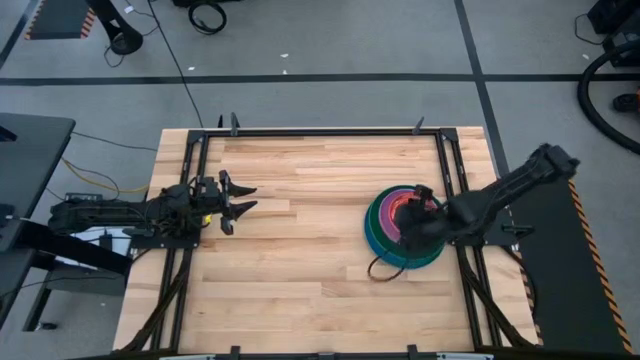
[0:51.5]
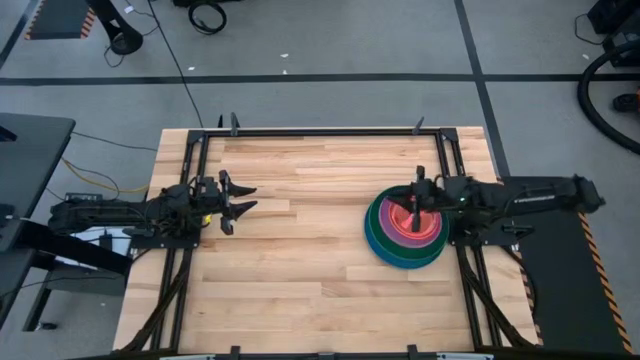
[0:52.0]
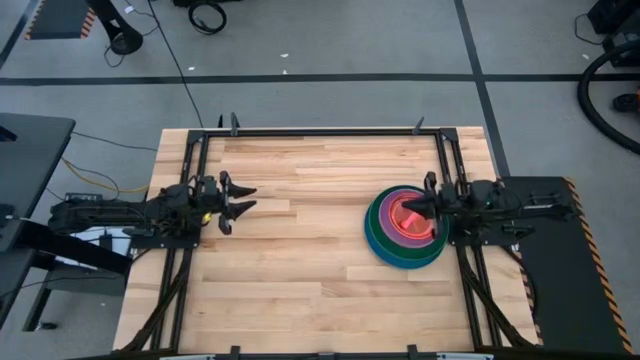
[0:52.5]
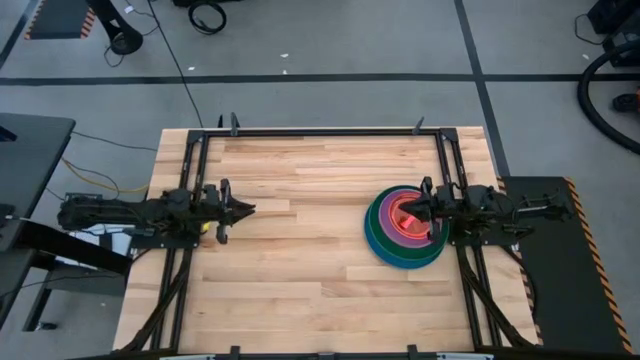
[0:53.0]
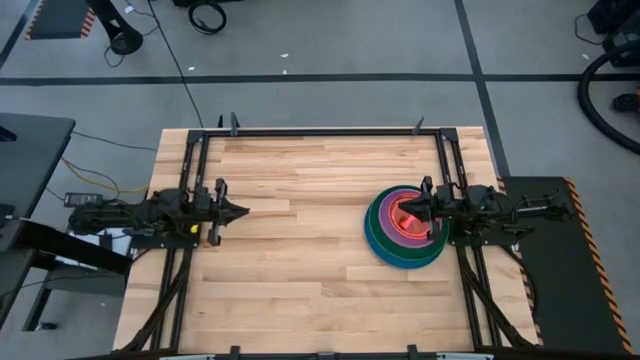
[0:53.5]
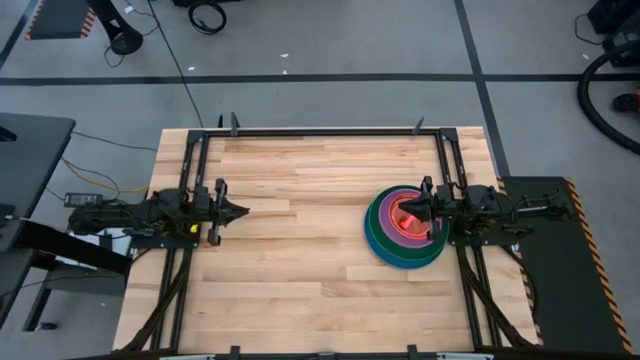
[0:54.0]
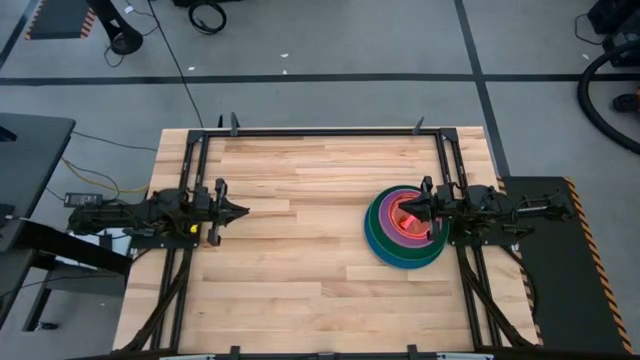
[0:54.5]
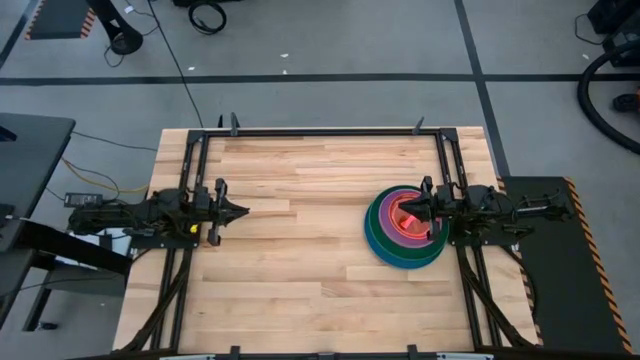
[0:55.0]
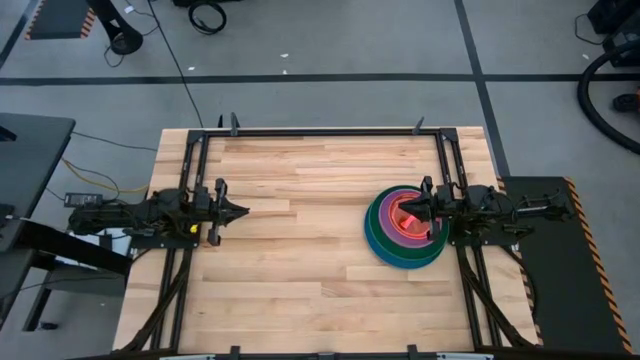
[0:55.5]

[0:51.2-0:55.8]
Task: Stack plastic plates
Return to Home Position

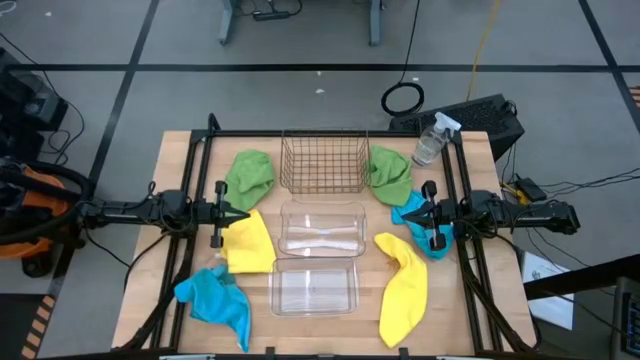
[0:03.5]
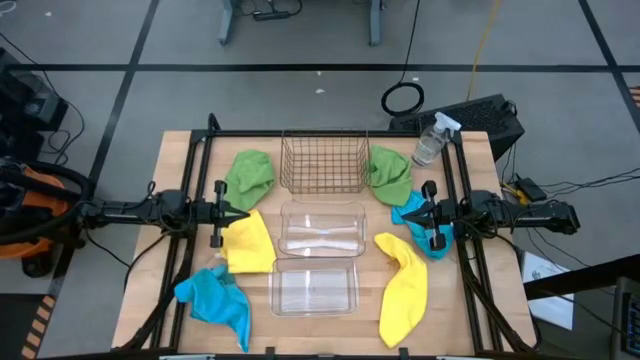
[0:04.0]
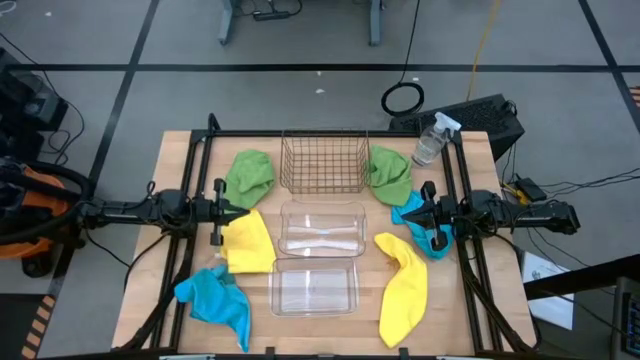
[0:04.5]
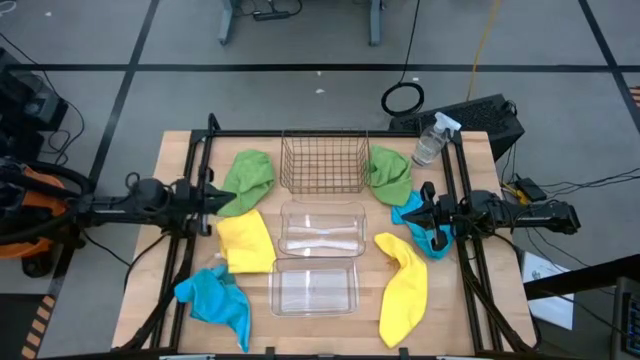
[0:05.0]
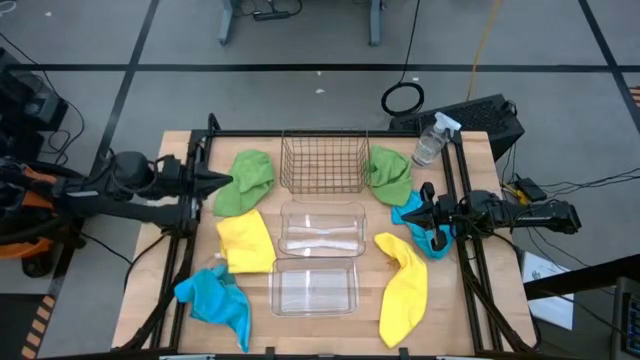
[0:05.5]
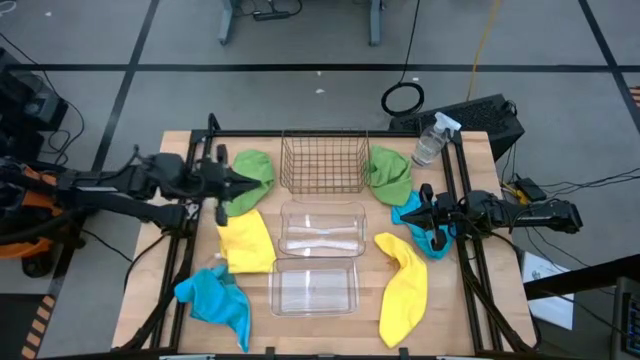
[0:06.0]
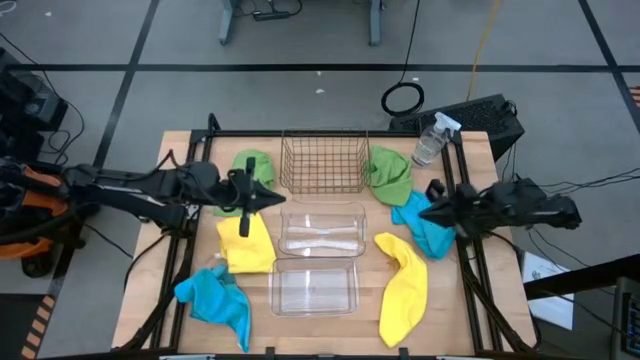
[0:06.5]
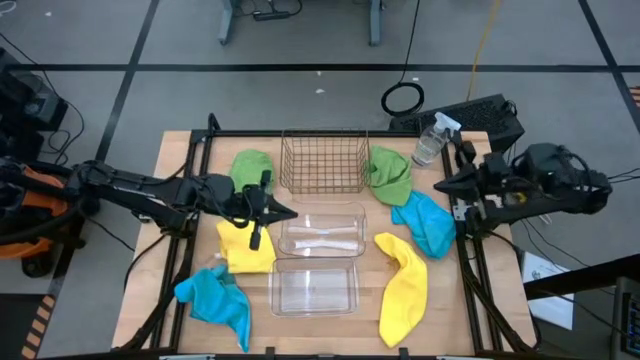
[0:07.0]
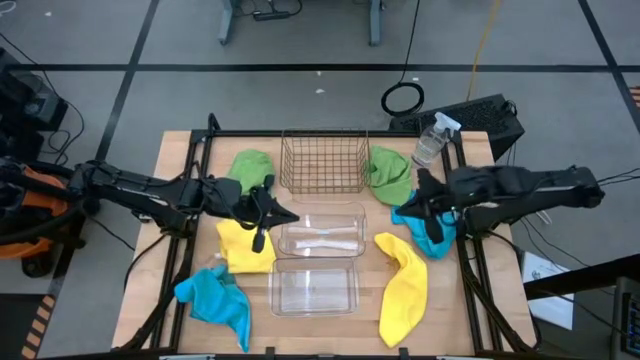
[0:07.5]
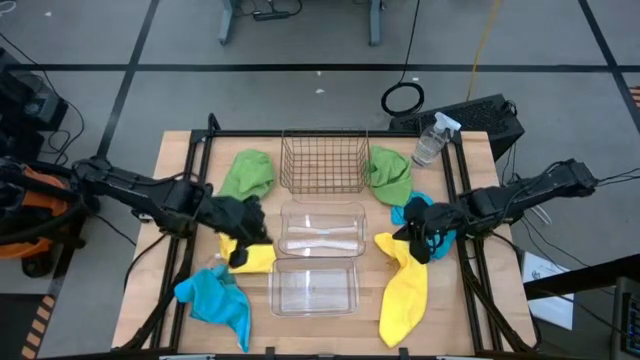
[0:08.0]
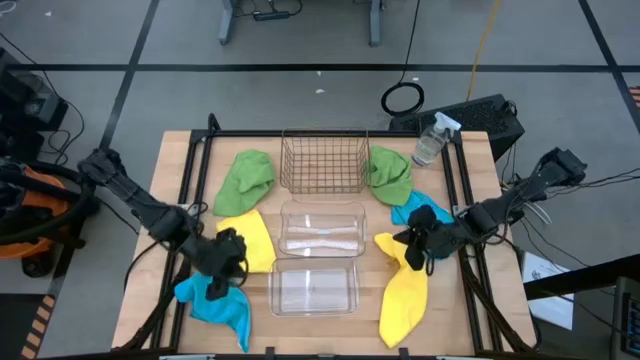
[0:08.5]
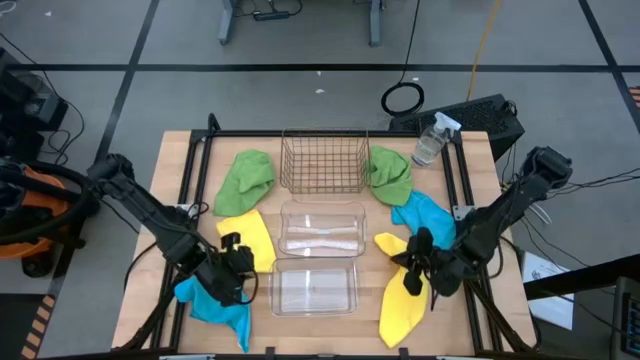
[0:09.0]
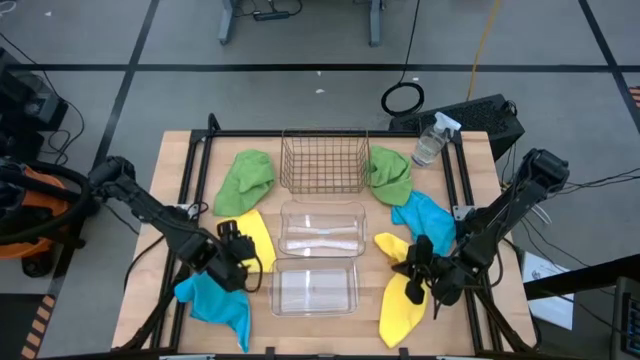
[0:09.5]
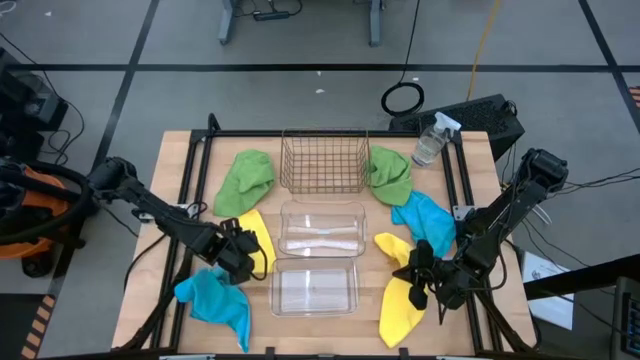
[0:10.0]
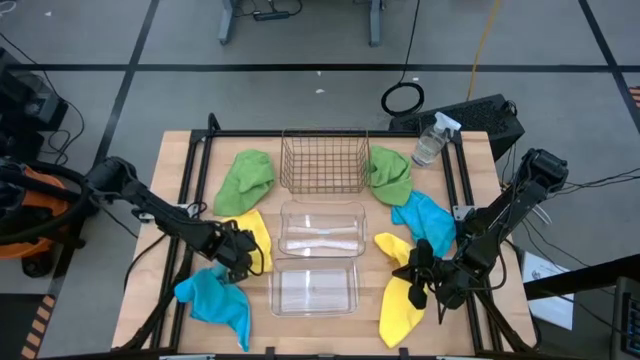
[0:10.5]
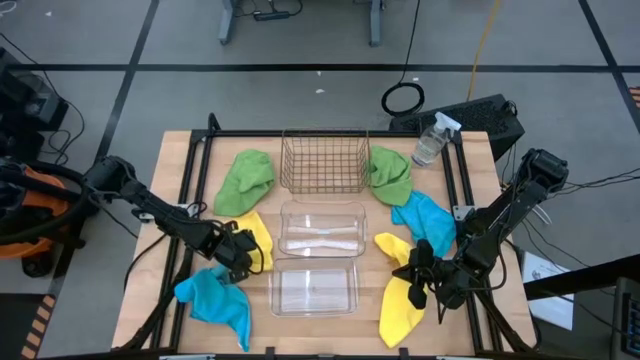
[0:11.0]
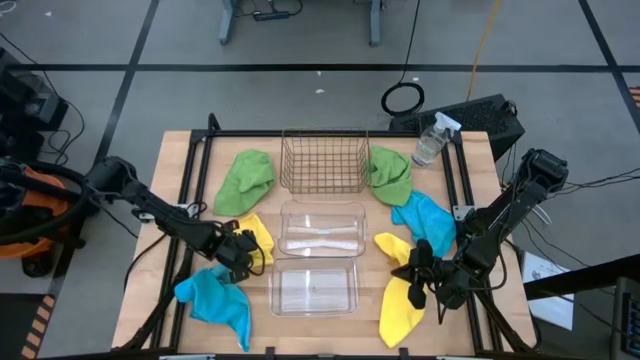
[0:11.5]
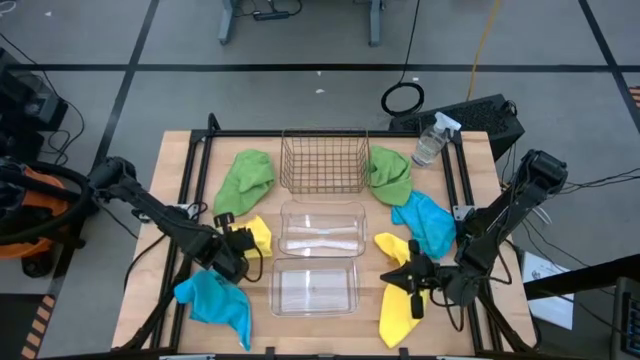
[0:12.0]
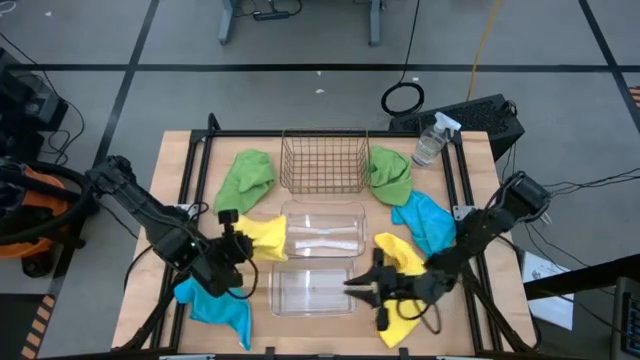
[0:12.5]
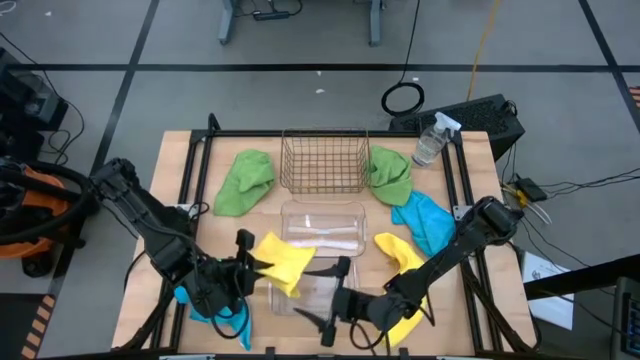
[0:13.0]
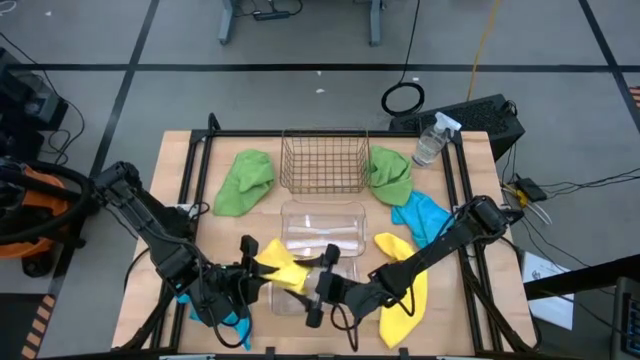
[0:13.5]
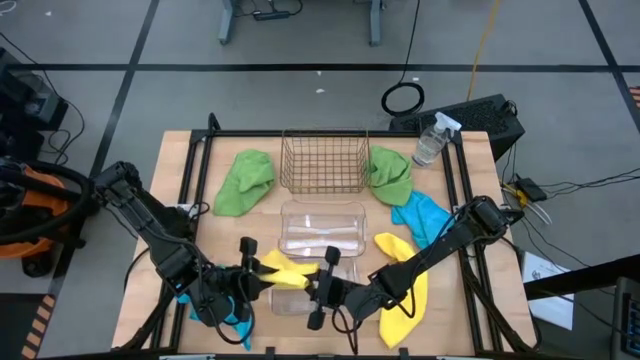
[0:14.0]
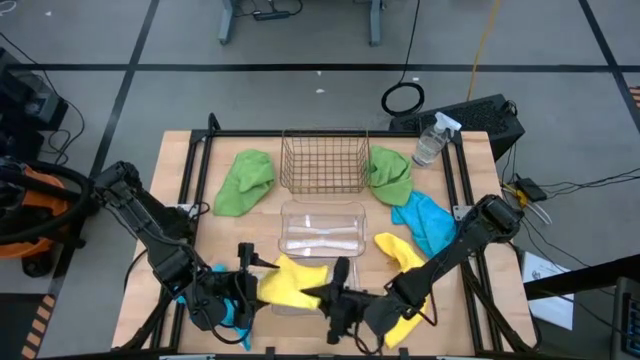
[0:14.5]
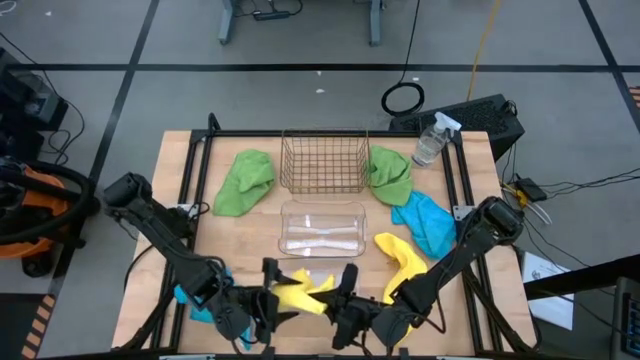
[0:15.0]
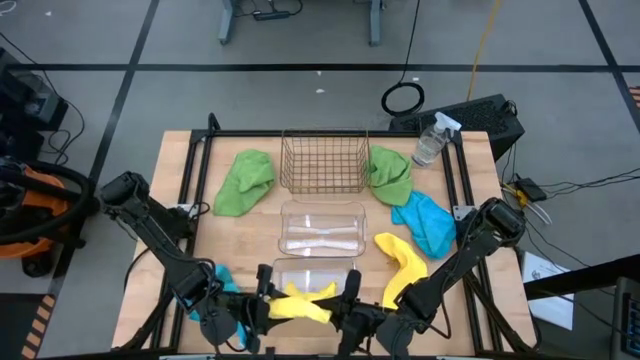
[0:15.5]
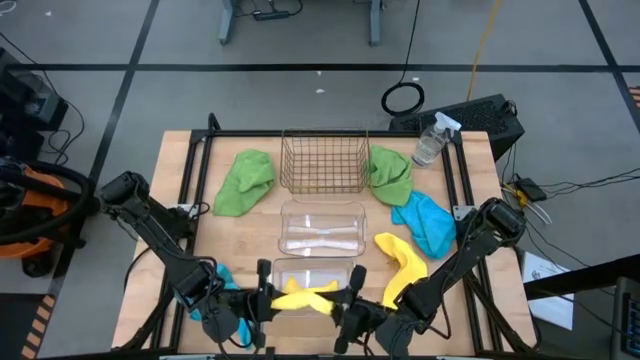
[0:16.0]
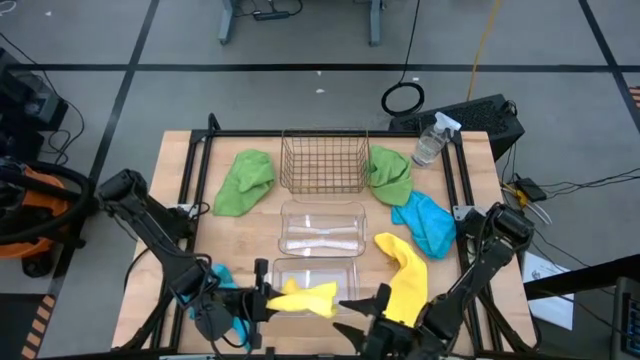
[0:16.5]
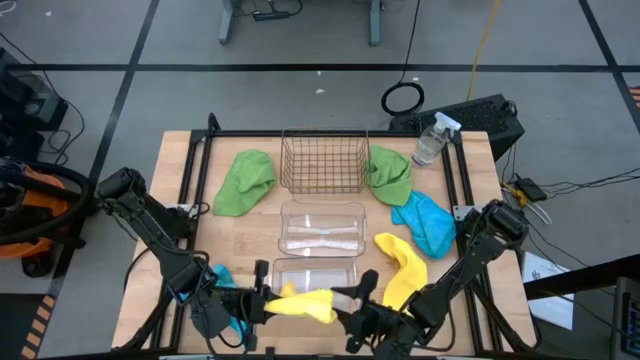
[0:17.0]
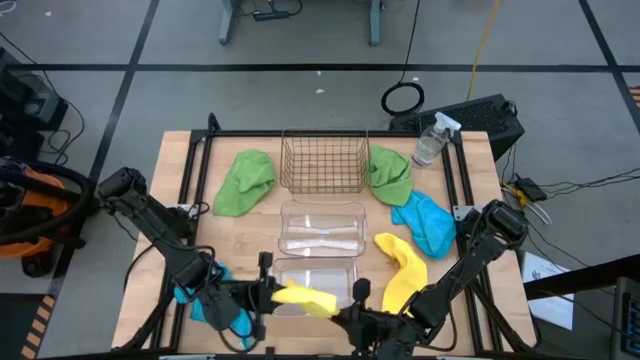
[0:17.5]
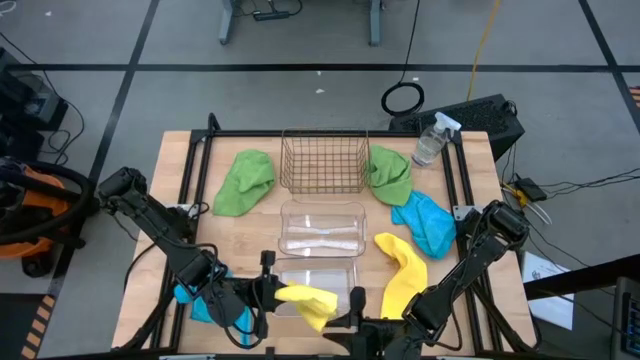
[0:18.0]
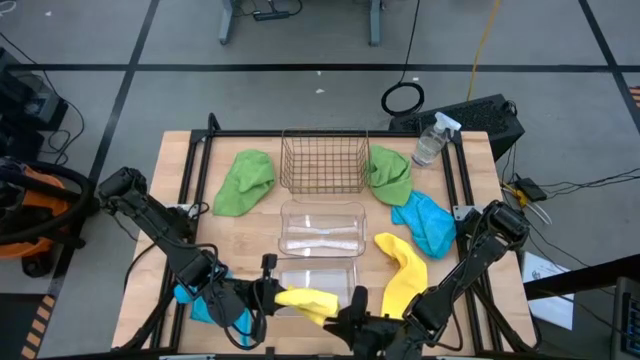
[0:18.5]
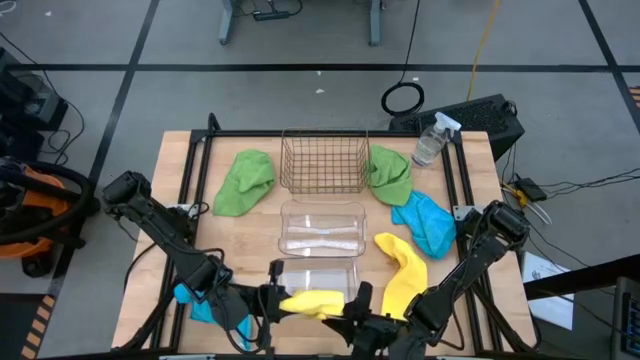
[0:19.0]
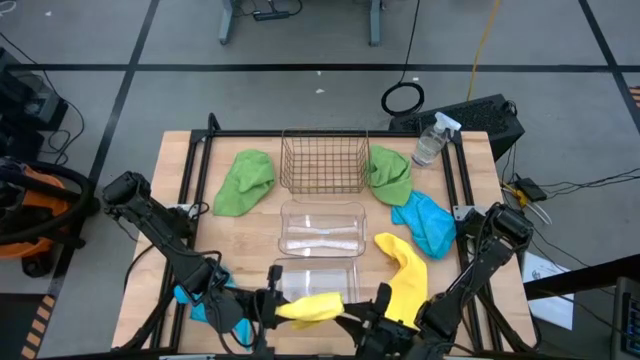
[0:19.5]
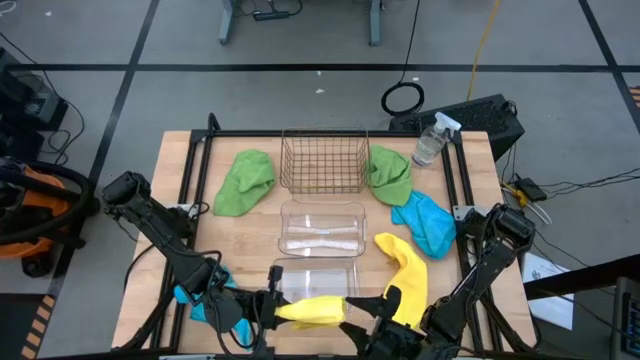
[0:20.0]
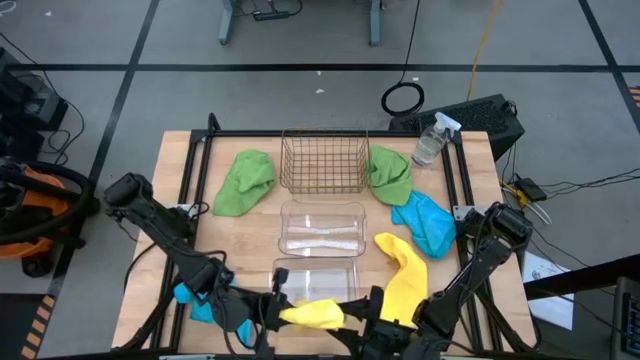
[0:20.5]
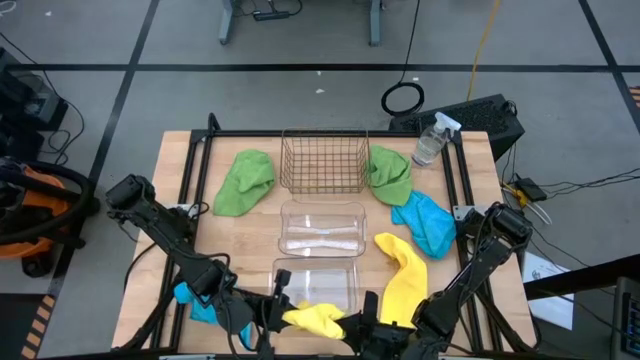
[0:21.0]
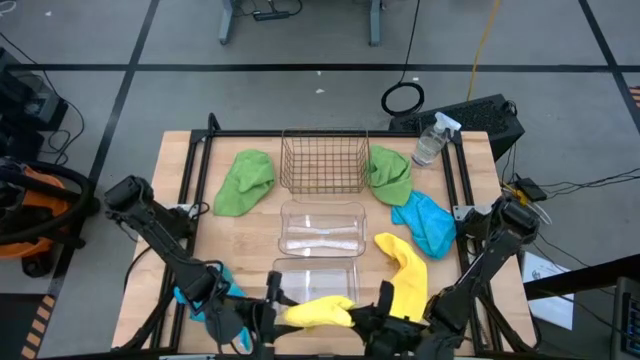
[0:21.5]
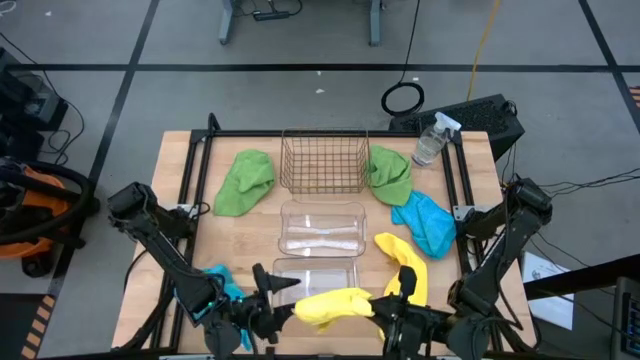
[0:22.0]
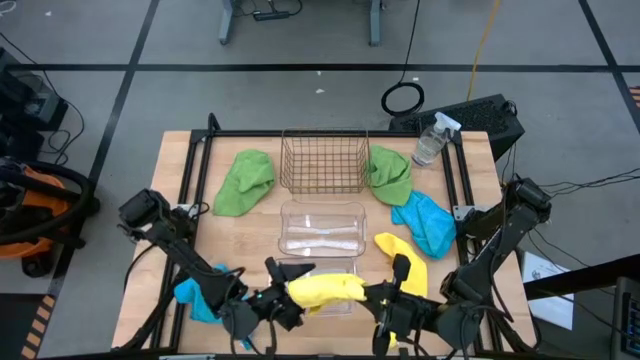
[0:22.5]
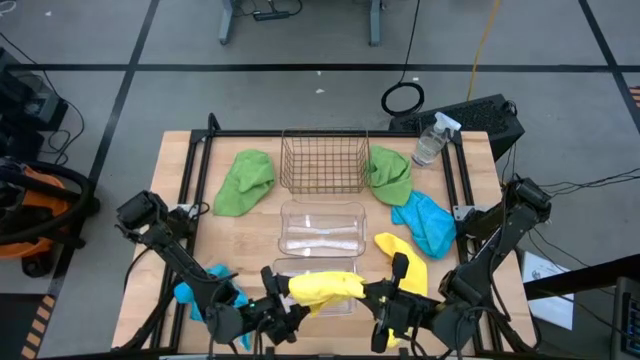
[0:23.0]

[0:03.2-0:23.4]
Task: Sort microfiber towel by color & place in baskets
Put the left yellow towel into the bottom transparent bin
